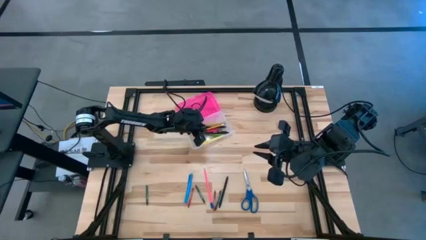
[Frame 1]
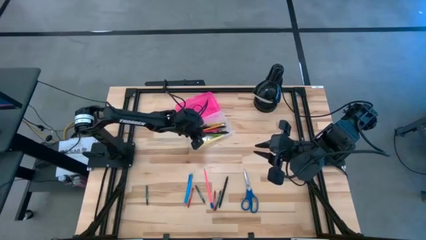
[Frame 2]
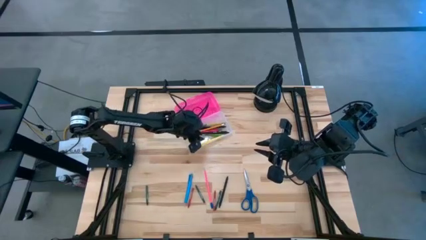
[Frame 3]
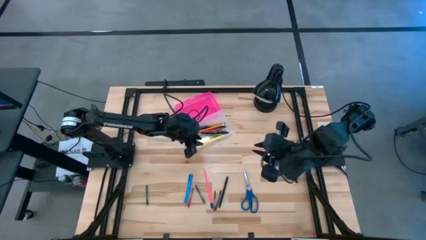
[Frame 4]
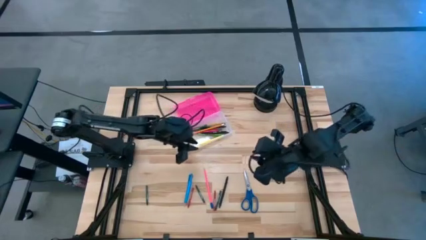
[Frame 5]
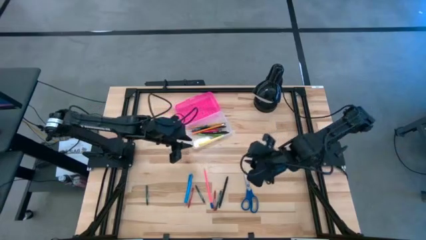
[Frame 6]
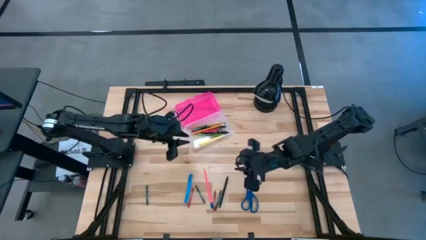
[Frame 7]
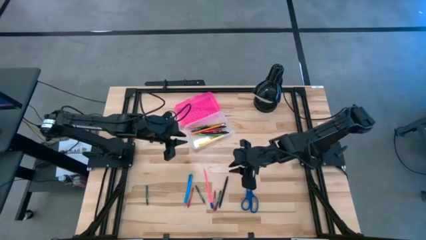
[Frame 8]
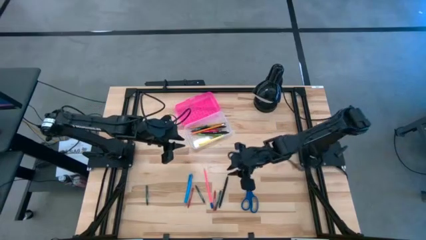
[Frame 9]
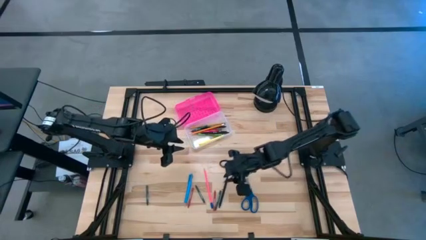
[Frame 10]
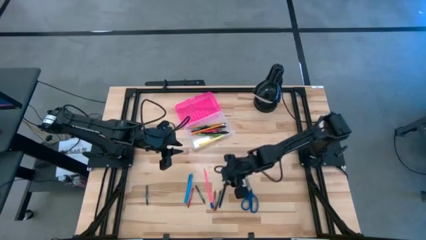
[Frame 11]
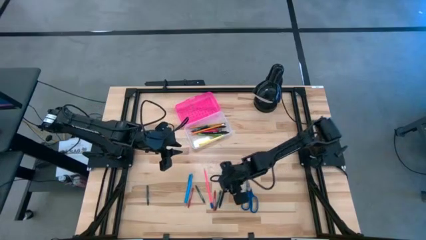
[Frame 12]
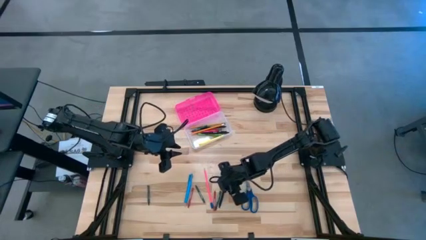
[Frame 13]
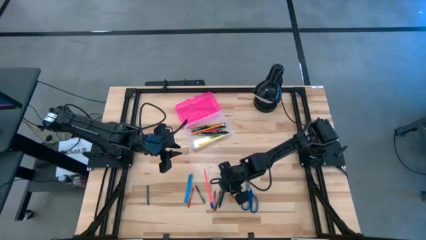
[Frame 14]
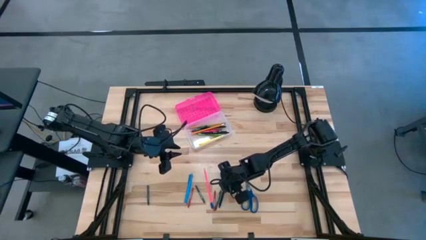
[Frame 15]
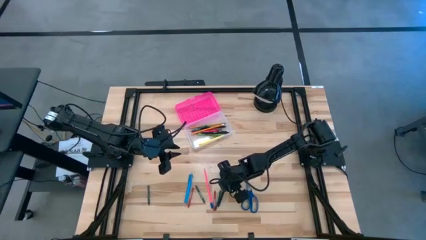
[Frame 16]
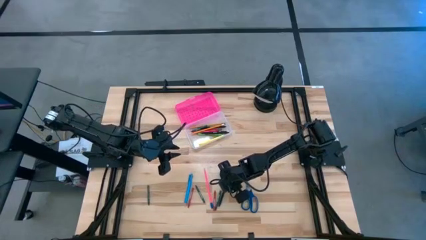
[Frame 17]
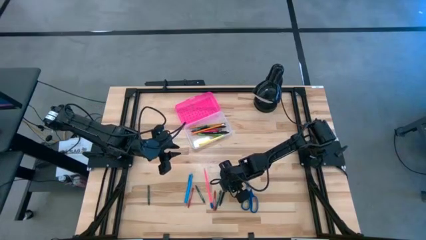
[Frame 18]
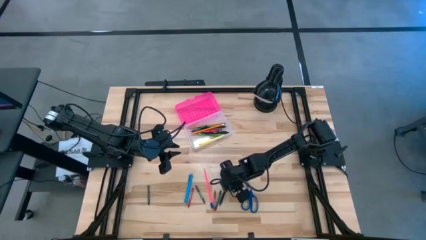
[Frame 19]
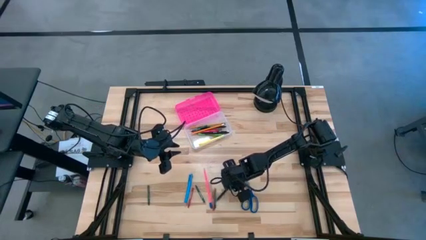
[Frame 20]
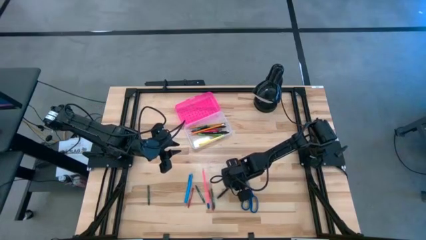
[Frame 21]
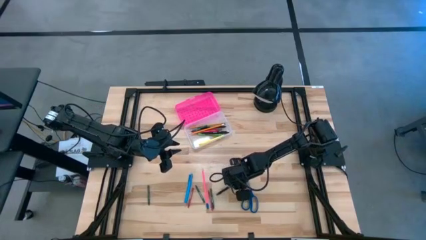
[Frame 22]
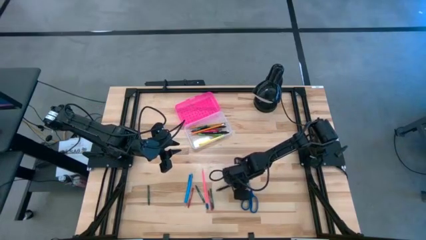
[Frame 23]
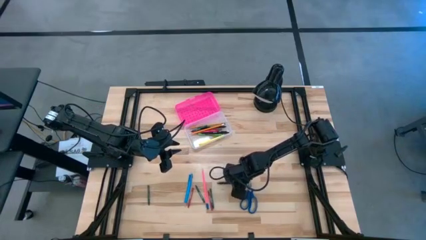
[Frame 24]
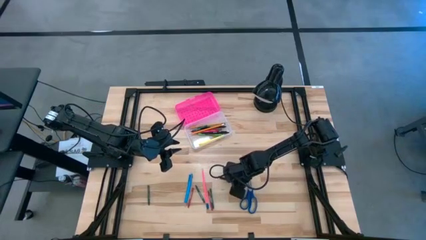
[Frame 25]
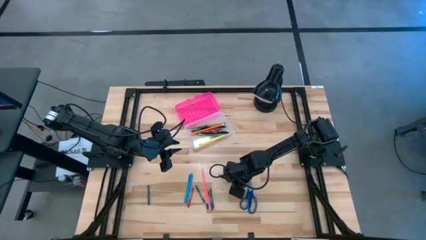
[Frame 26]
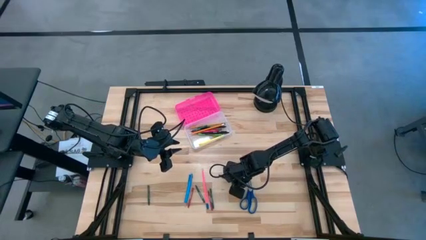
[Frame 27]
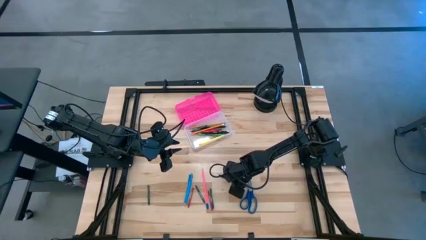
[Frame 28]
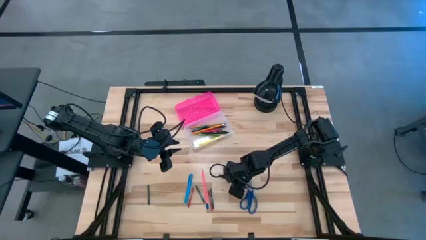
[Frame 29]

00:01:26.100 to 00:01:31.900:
Task: Pick & place school supplies into a supply box
Put the black pen into the pink supply box

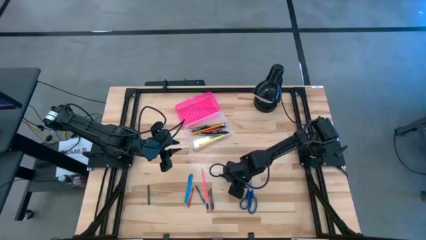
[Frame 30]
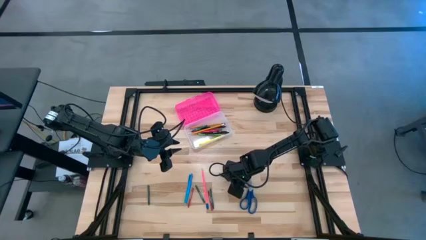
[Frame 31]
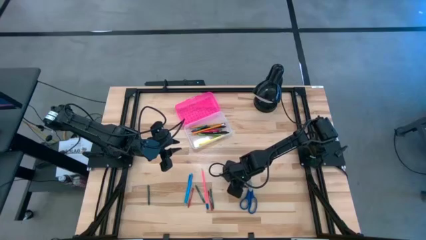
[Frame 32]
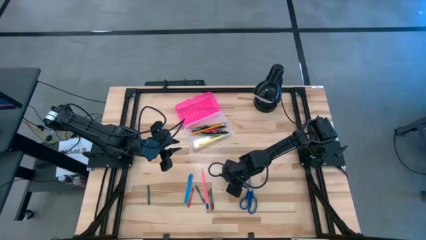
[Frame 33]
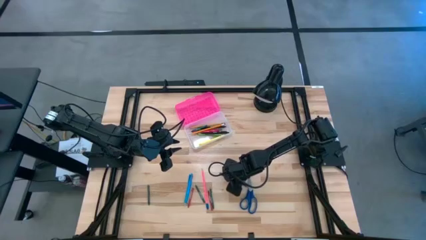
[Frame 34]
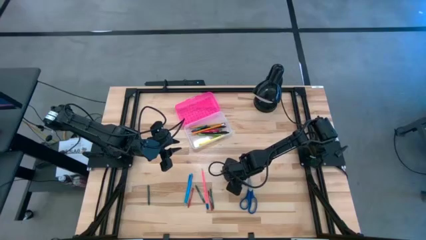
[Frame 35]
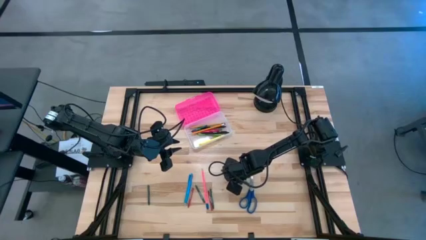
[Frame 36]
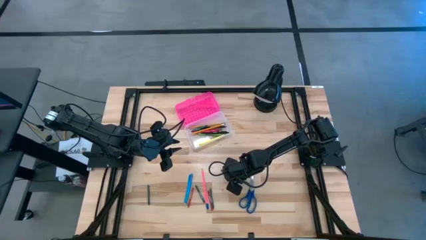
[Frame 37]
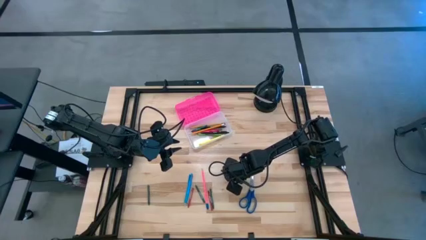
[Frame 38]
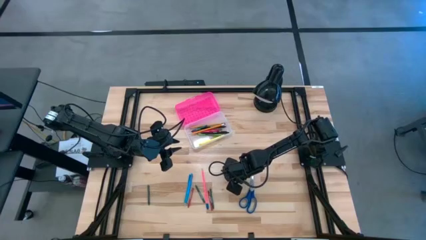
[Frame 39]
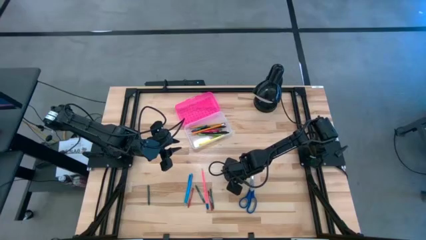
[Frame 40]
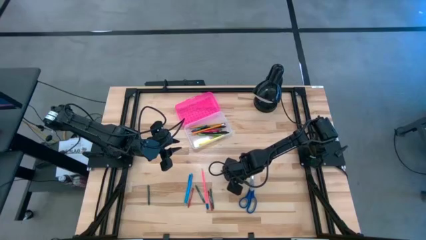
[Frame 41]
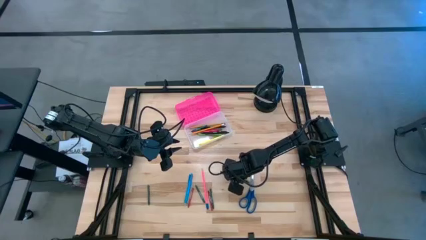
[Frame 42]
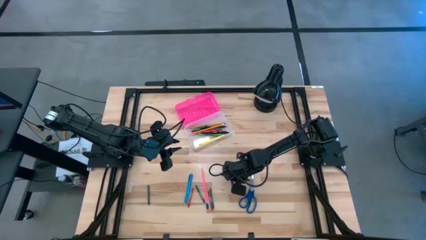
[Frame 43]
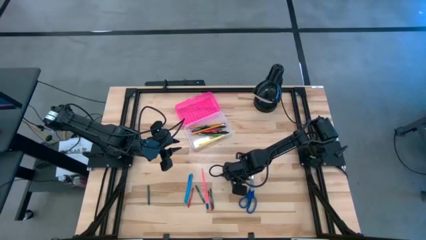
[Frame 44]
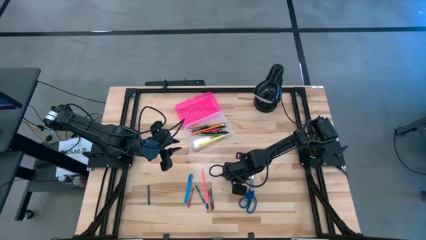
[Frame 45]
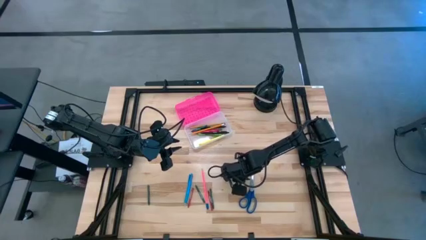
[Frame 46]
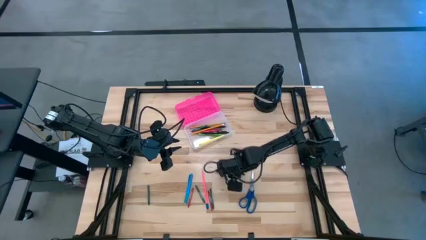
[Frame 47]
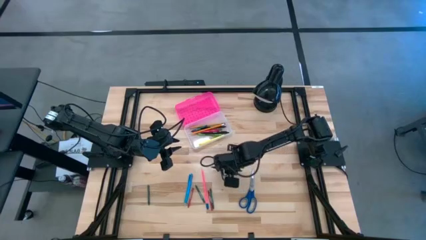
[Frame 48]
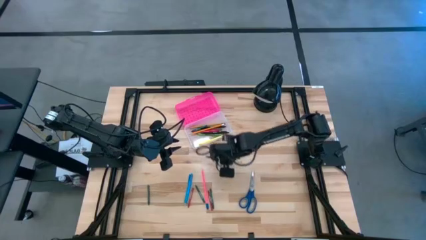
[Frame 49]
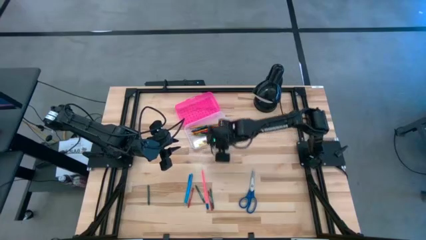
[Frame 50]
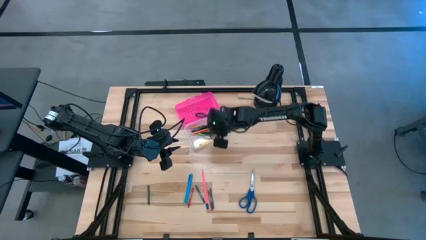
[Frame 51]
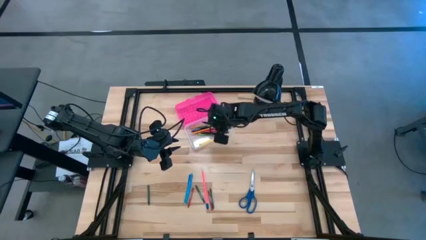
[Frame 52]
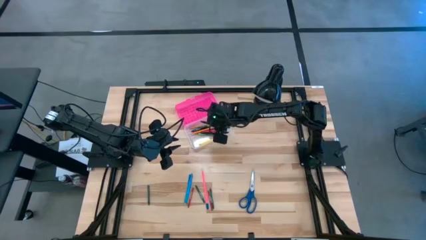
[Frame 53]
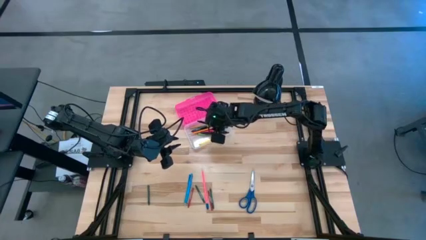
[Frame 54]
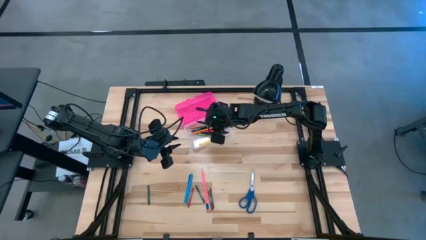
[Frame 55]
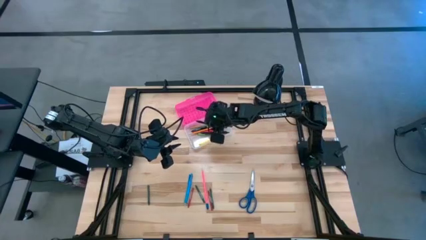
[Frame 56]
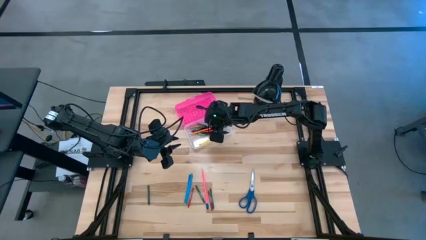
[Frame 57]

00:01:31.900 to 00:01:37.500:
Put the black pen into the pink supply box

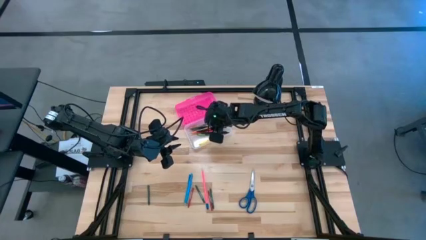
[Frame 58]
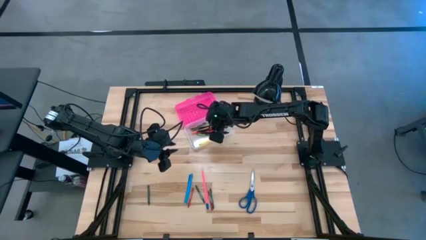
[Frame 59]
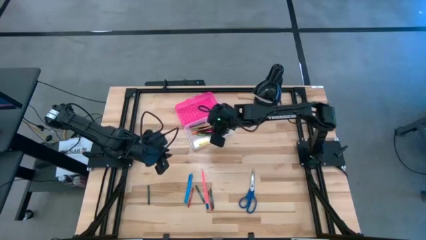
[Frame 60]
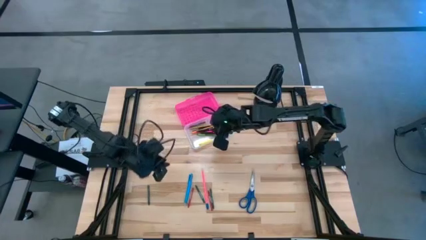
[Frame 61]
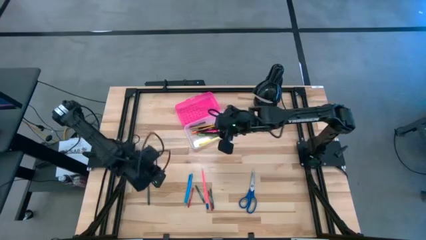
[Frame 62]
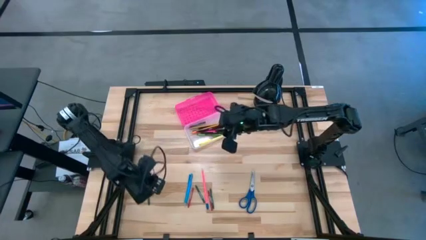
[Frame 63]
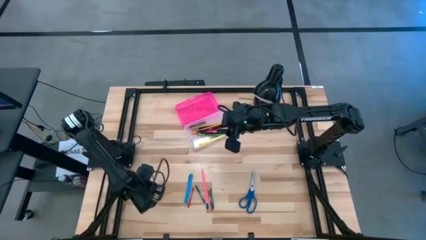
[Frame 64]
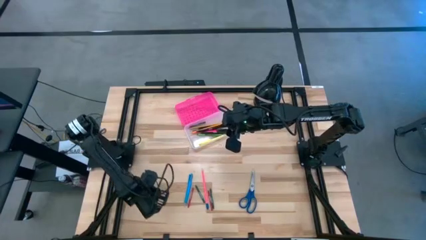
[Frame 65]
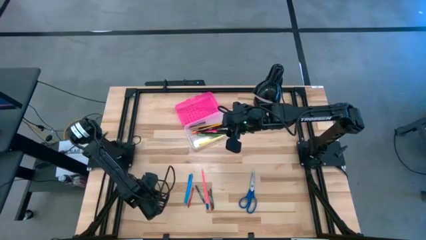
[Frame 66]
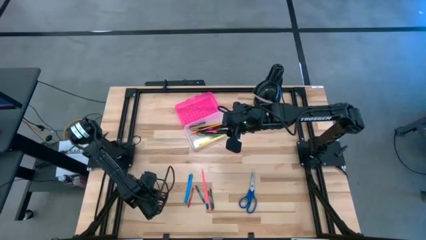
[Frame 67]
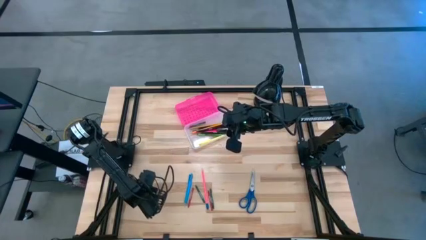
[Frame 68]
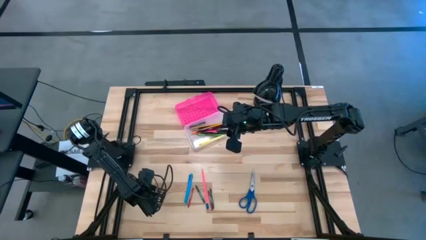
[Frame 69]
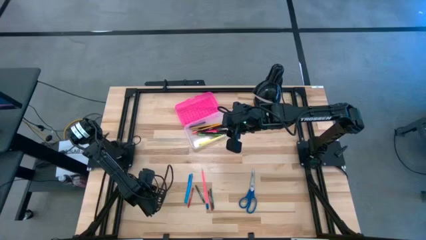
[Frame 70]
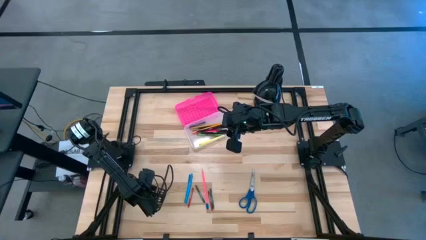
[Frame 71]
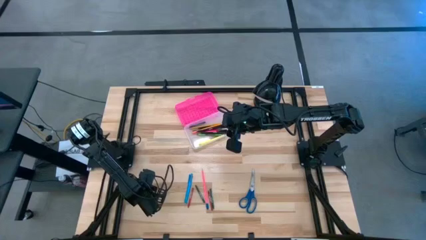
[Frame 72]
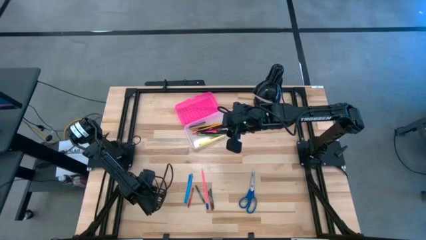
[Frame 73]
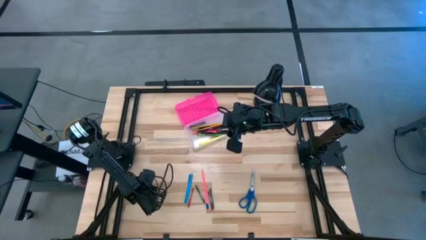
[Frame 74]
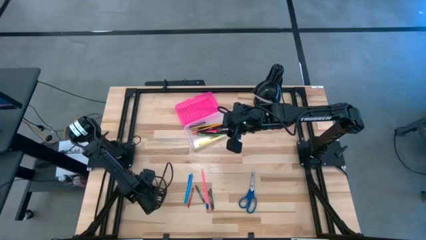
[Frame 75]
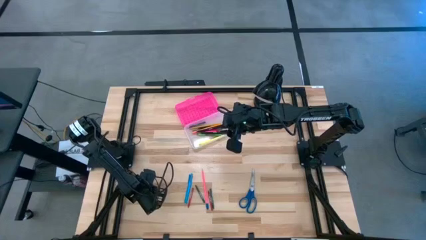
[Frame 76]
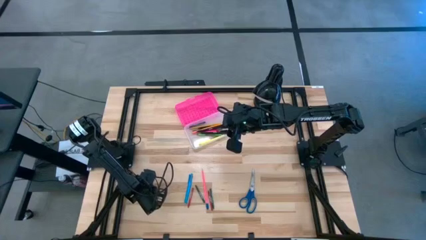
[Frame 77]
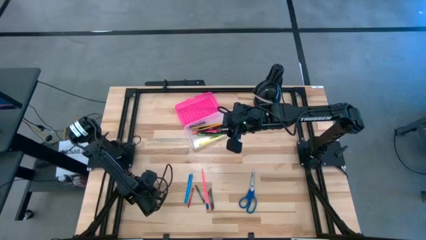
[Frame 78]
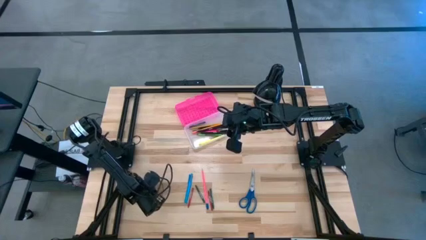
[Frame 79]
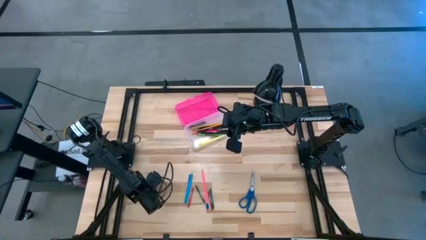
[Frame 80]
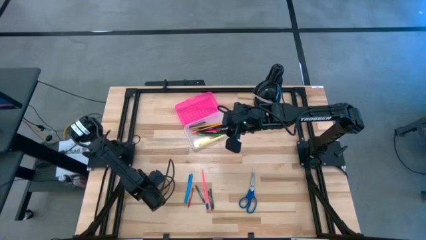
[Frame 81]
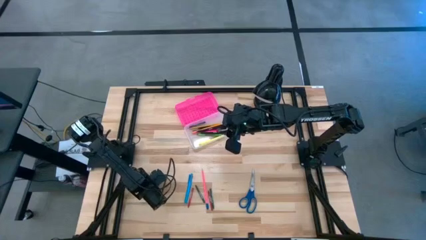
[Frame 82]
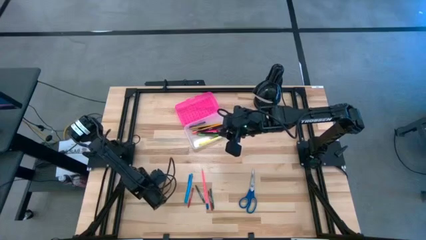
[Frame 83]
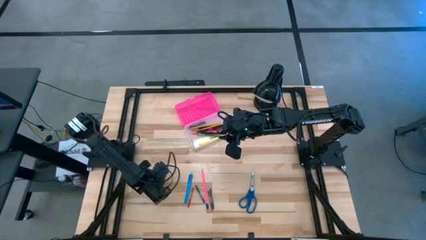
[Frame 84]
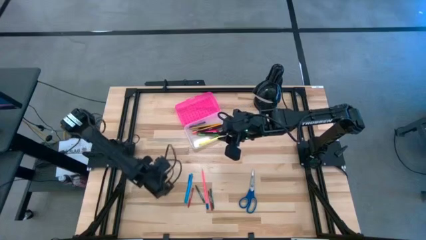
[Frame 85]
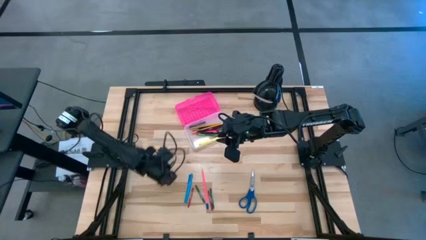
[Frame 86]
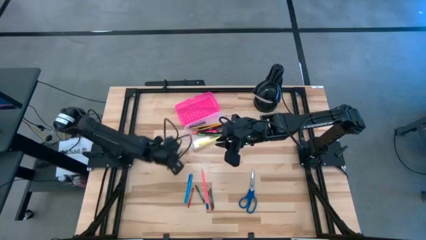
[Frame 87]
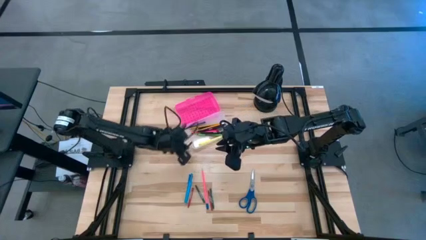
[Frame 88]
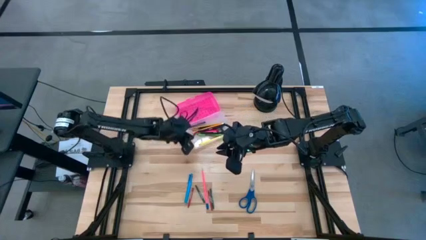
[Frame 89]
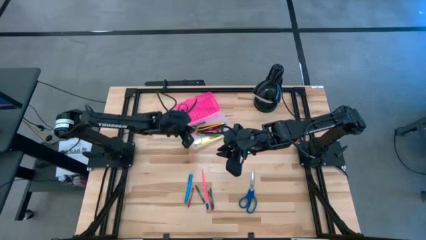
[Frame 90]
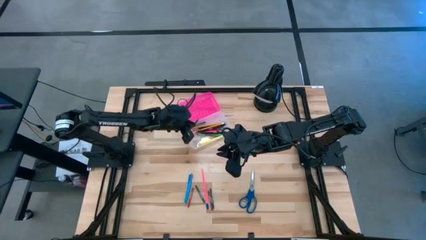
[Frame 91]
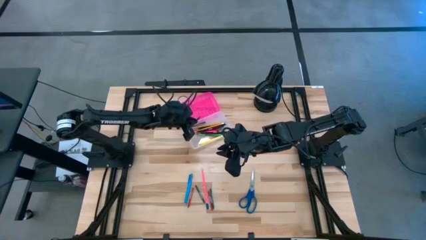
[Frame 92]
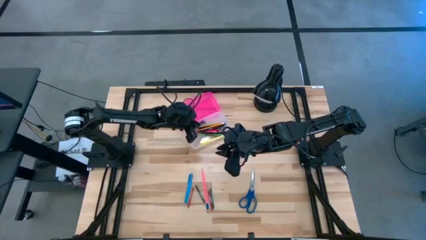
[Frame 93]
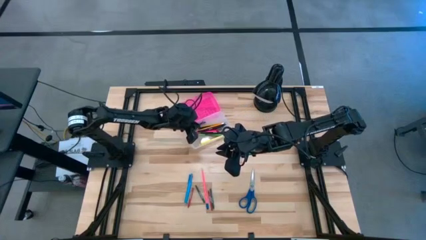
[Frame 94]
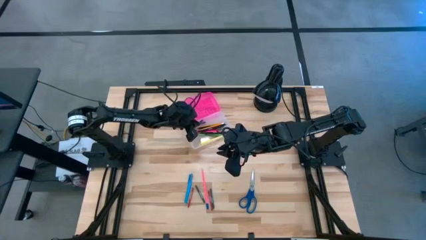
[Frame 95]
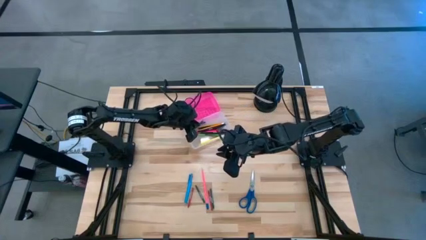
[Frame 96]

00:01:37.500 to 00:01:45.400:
Put the green crayon into the pink supply box
